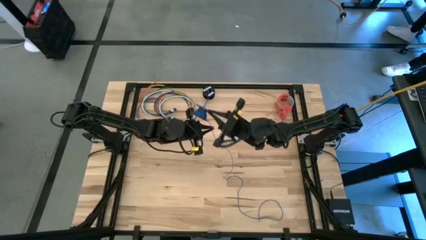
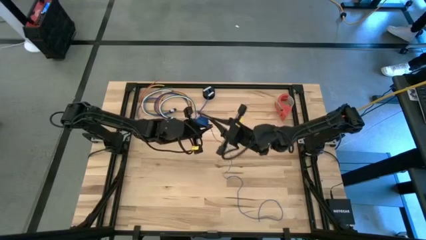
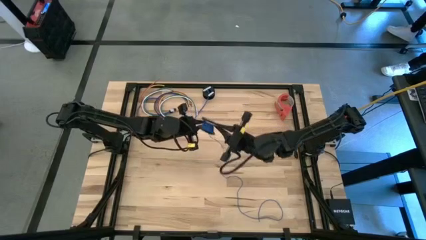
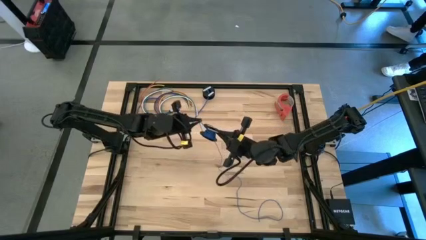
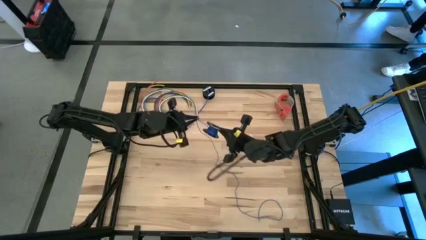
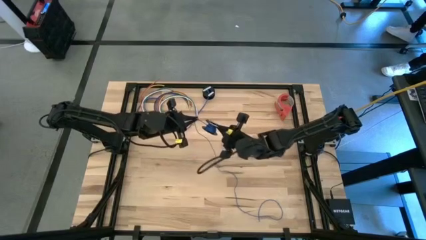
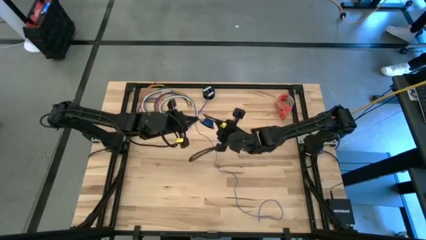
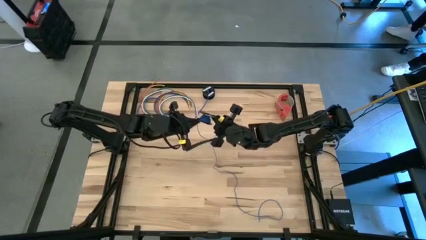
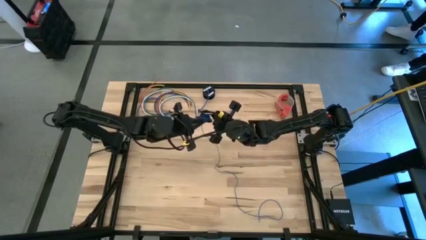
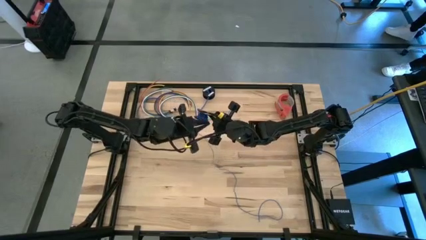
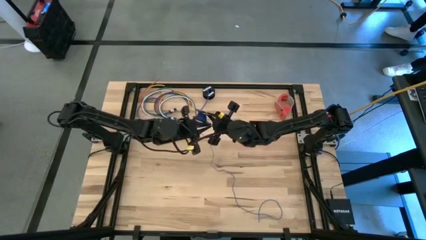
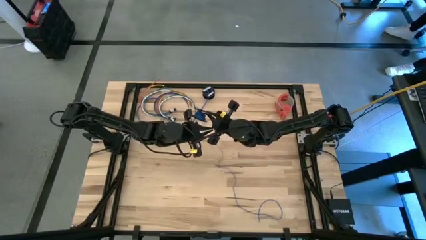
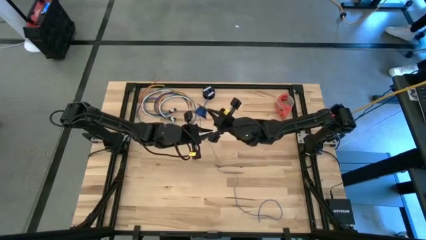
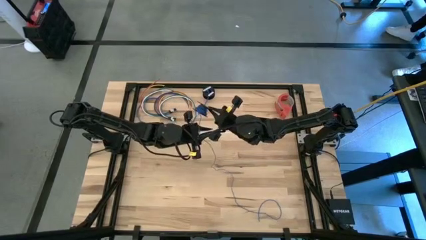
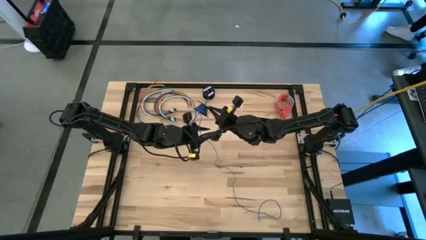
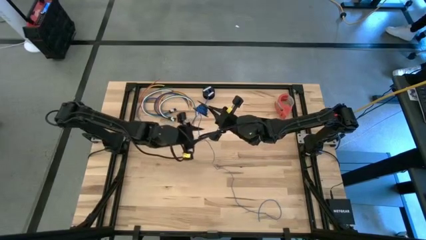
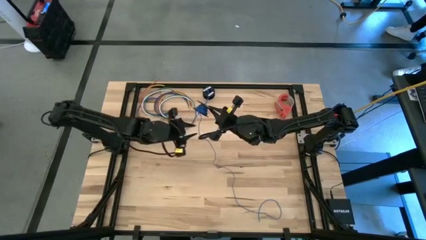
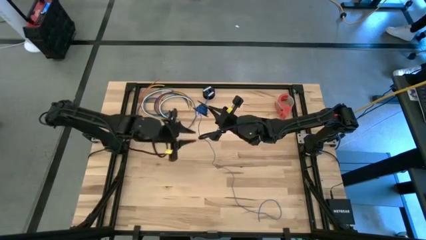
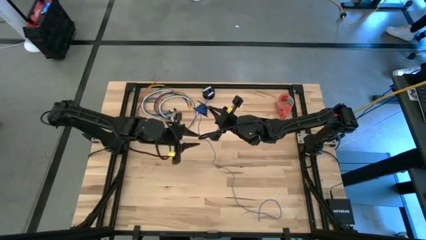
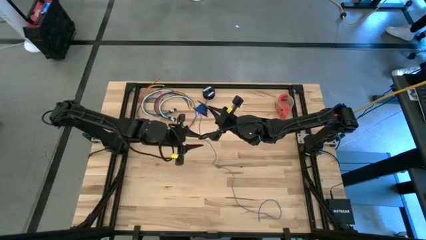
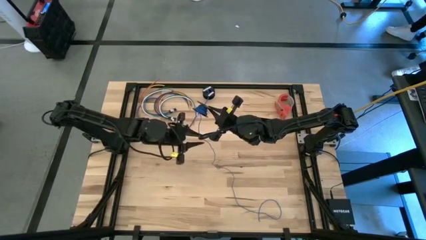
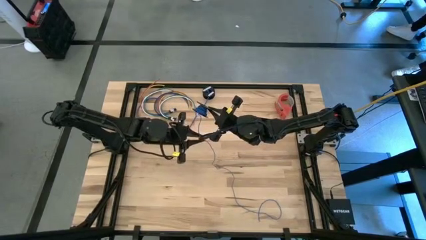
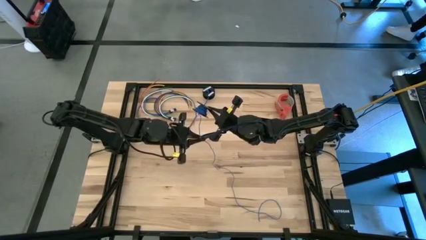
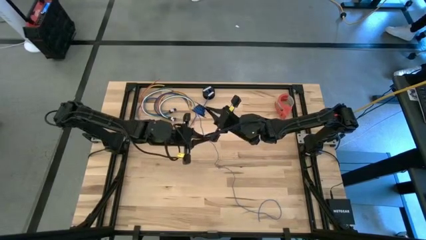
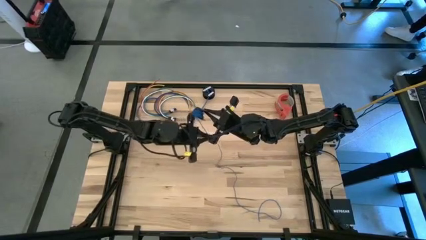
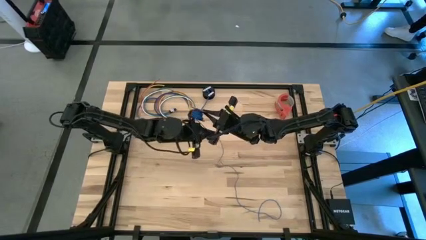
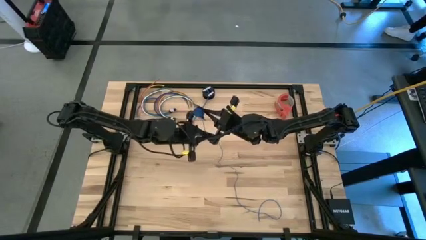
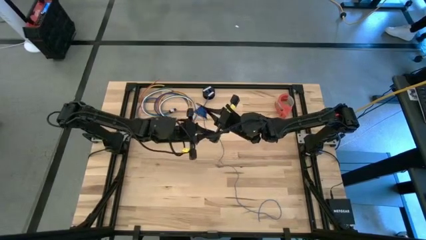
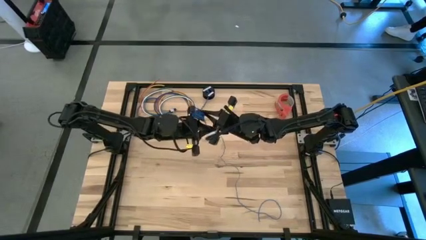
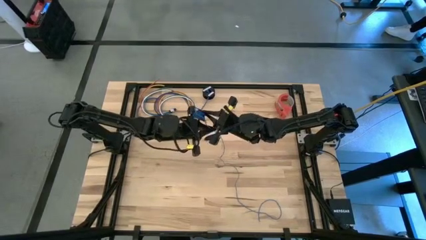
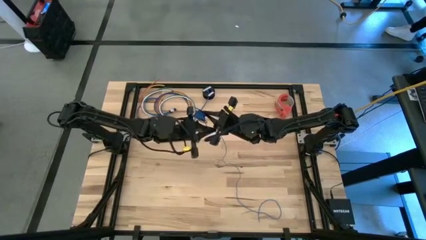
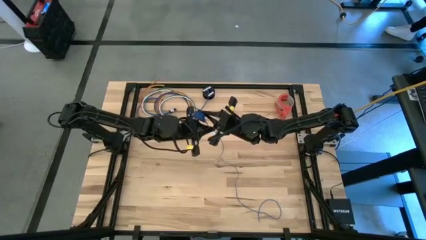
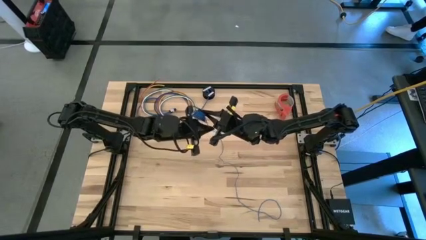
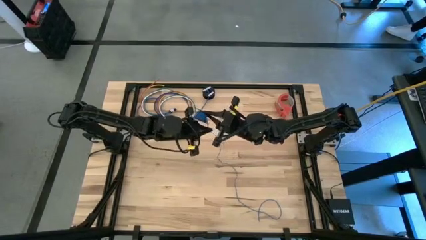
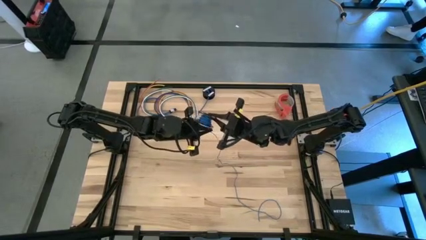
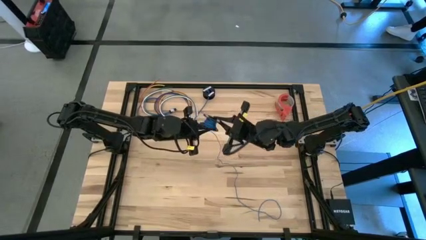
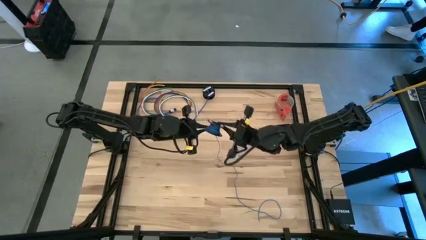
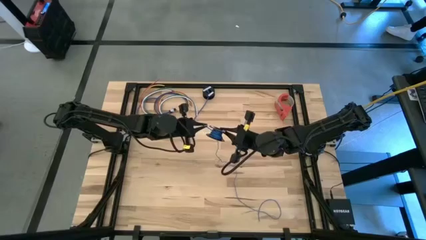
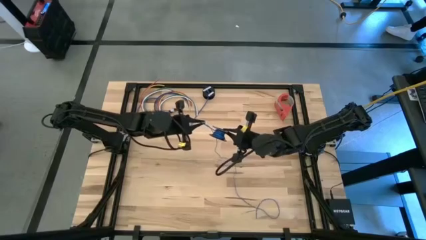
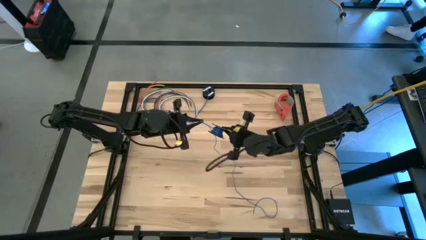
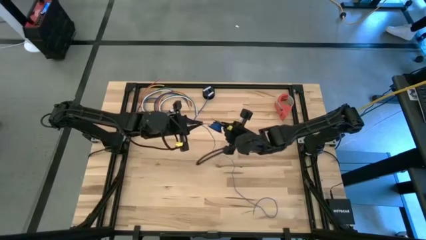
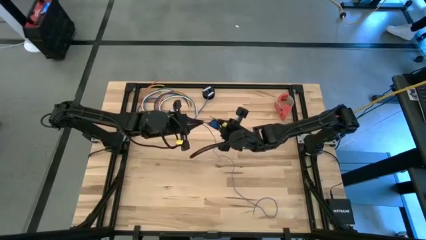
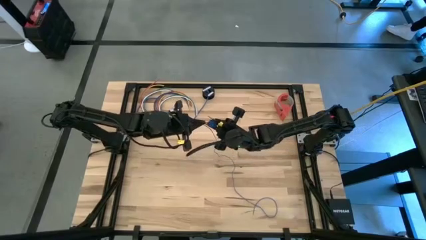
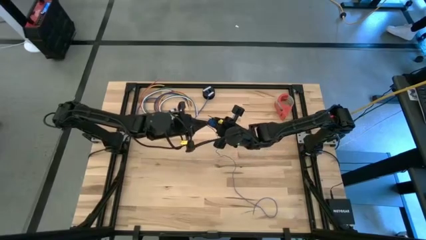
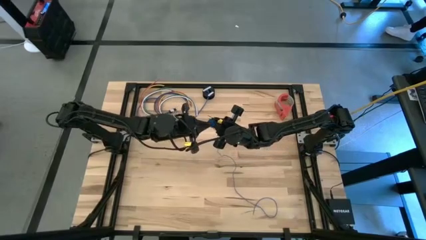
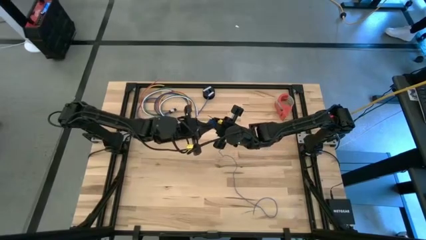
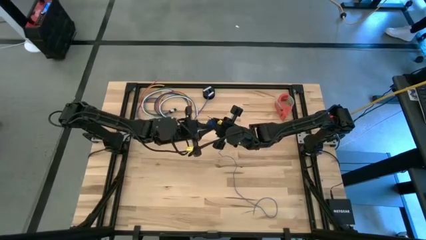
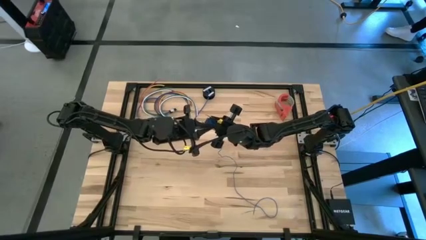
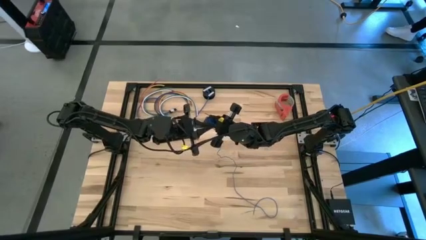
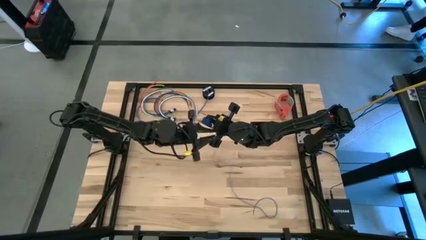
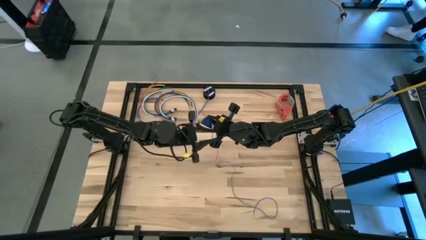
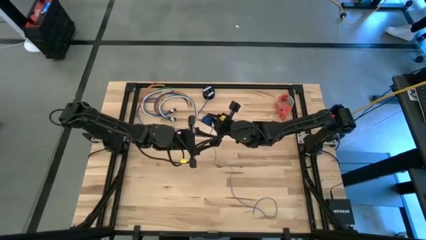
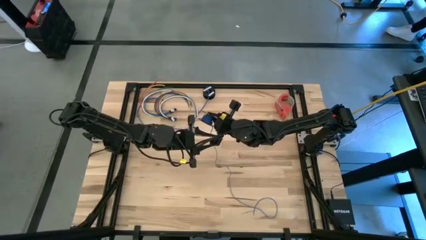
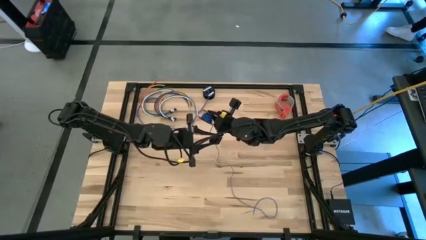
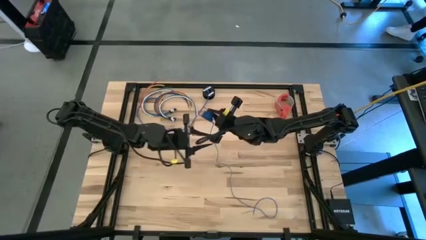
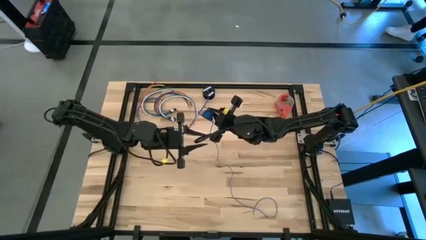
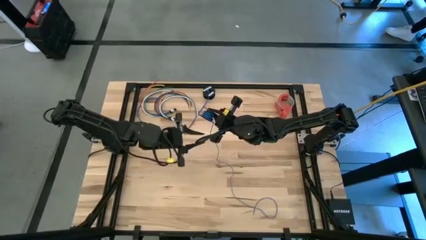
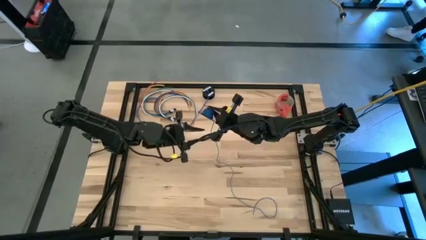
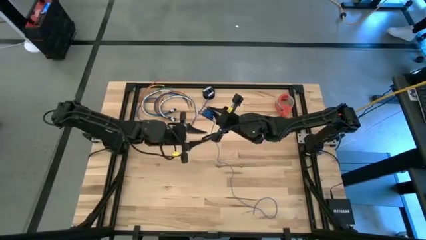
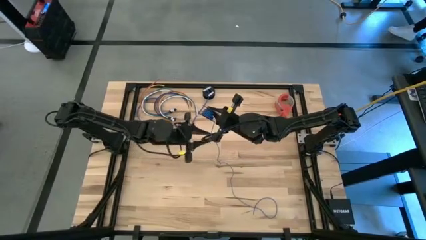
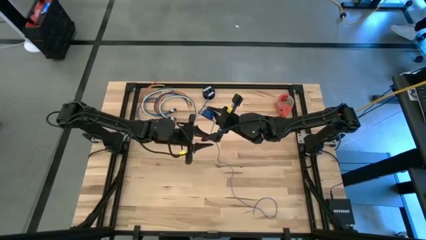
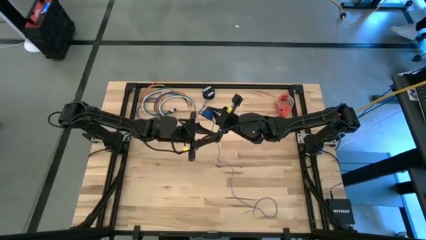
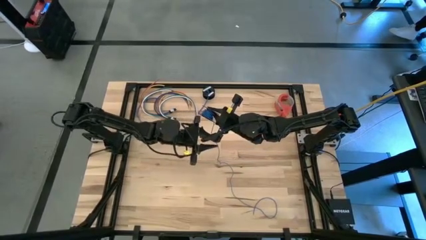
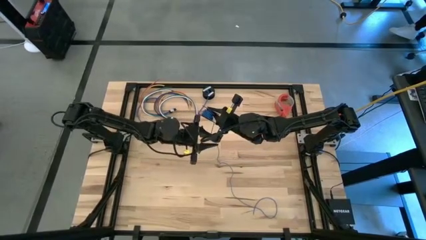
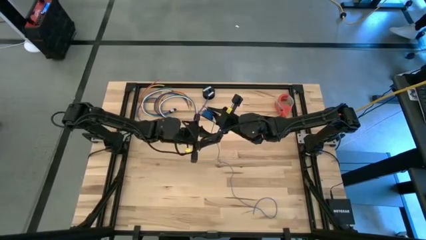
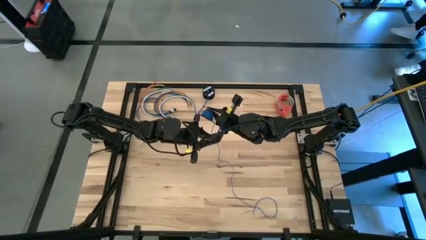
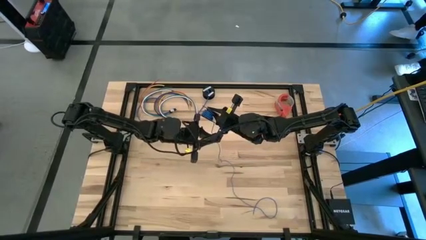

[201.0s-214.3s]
Task: Coil cords
Coil the blue wire onto the black spool

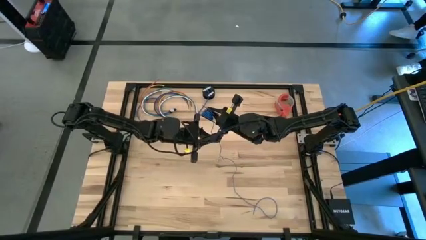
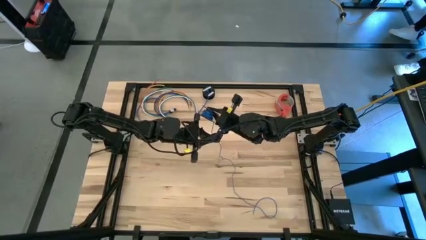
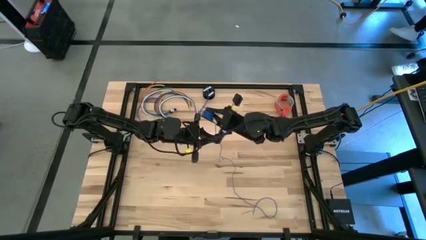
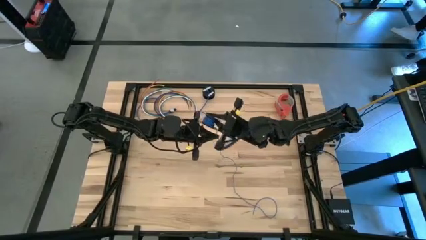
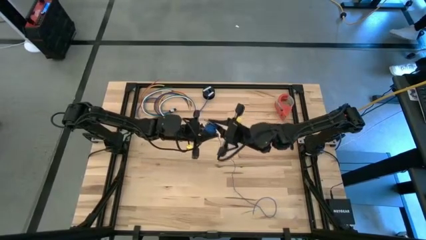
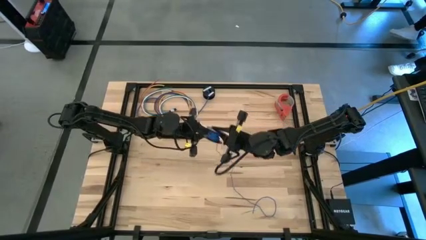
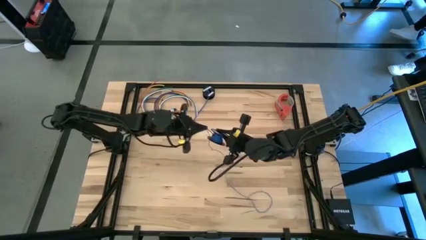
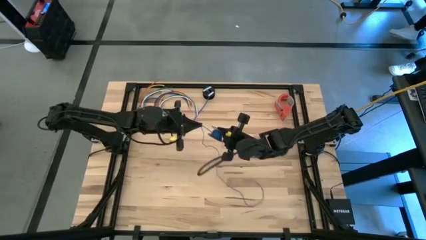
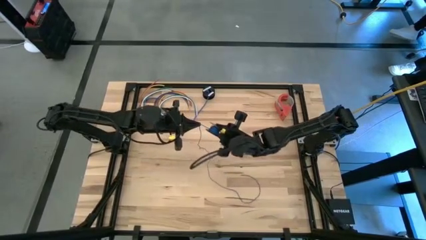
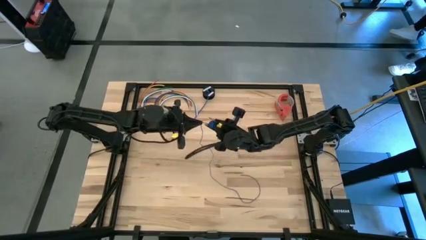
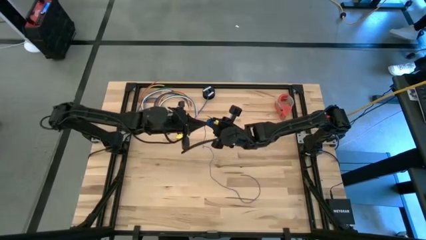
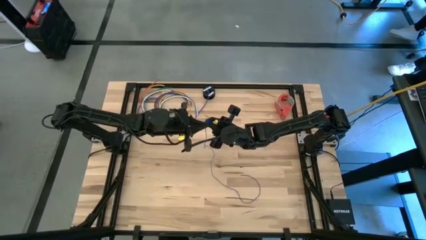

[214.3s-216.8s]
Coil the blue wire onto the black spool

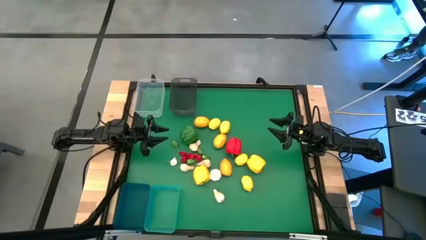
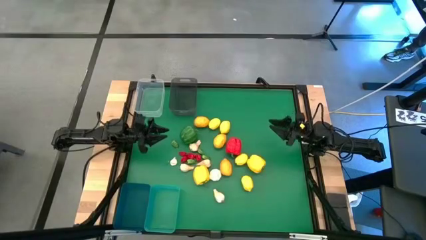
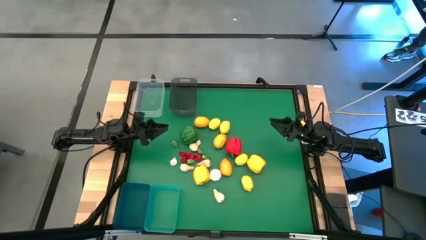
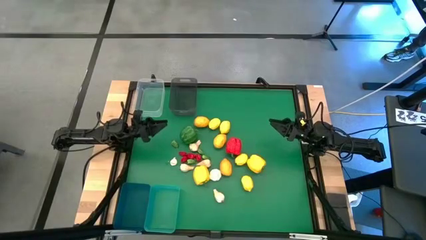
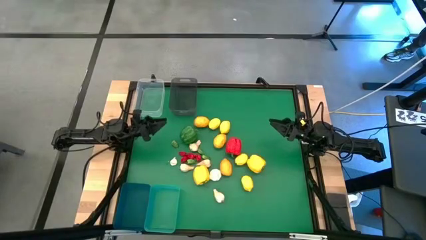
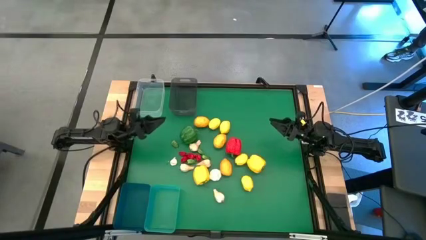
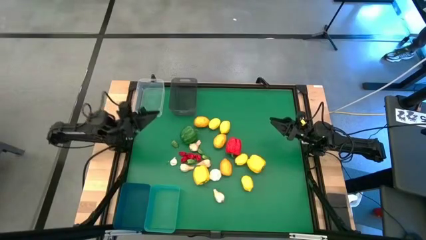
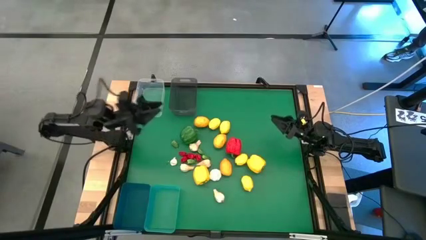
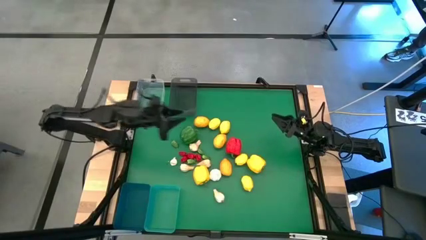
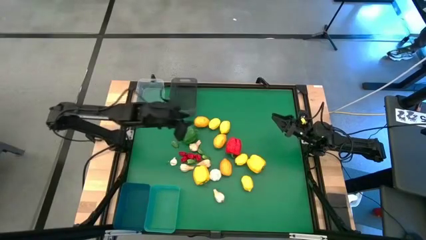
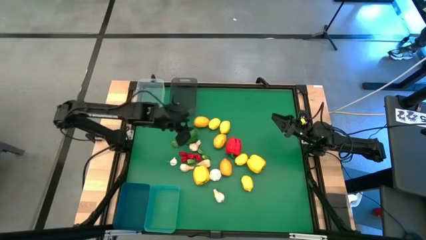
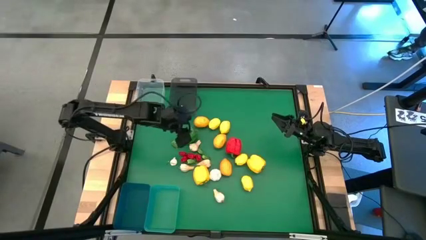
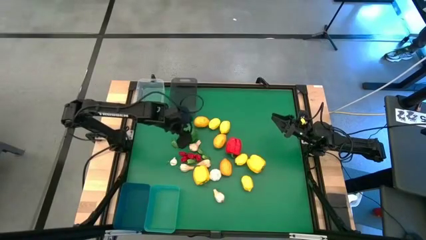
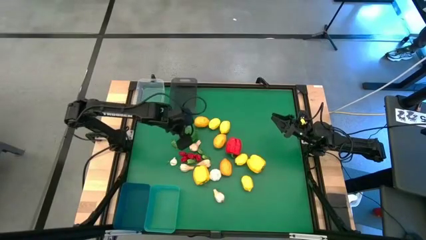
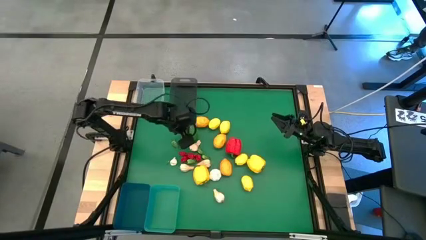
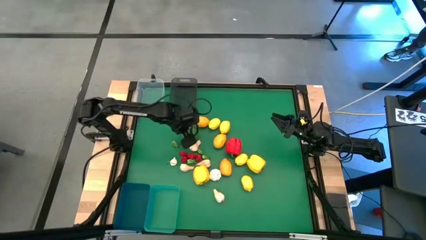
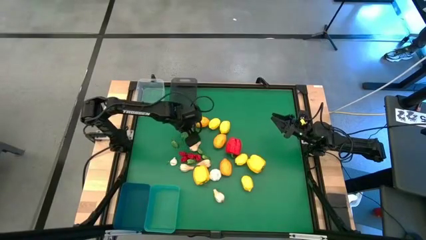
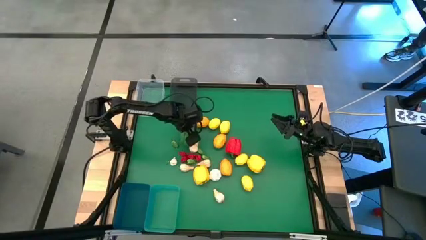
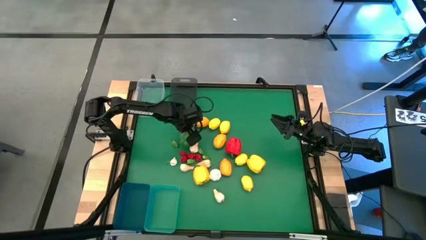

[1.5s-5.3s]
Task: Sort produce into baskets
Put the green bell pepper into the transparent bin
